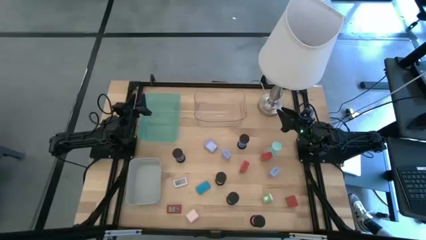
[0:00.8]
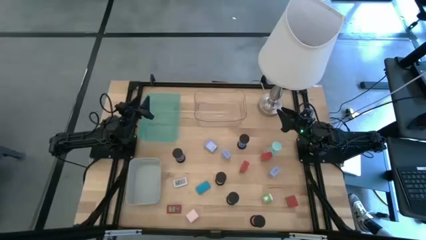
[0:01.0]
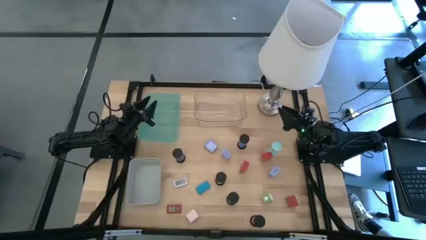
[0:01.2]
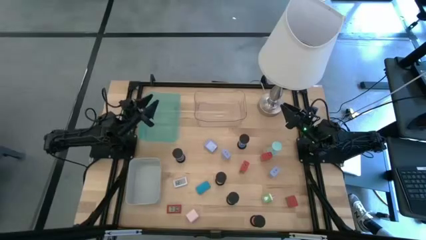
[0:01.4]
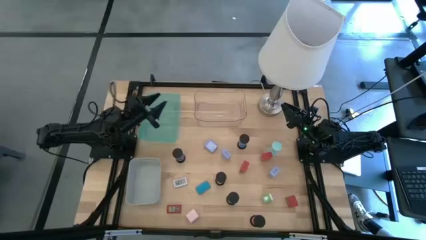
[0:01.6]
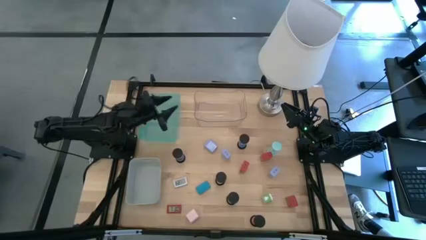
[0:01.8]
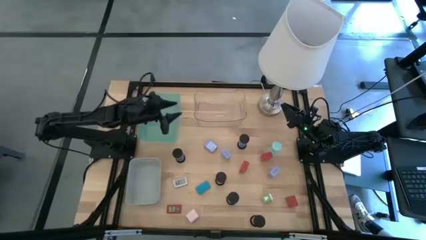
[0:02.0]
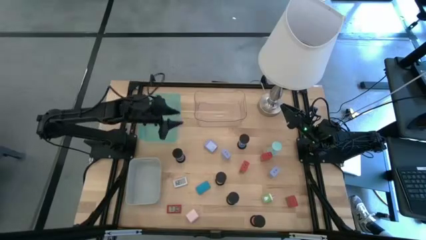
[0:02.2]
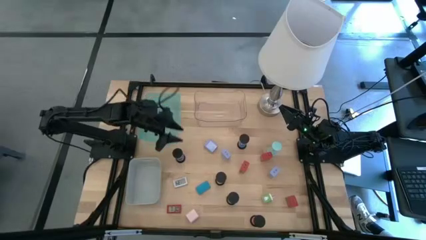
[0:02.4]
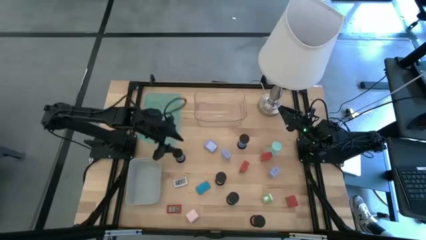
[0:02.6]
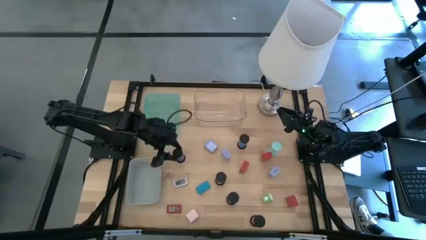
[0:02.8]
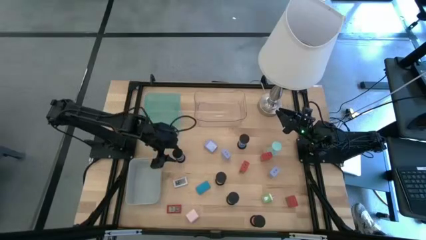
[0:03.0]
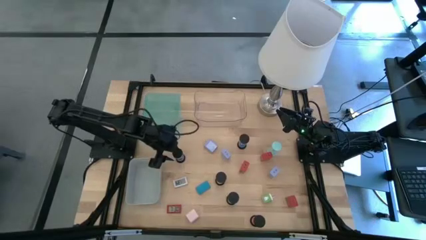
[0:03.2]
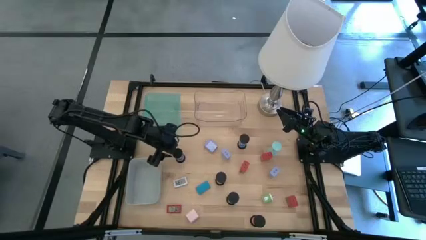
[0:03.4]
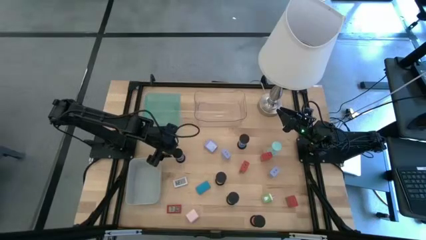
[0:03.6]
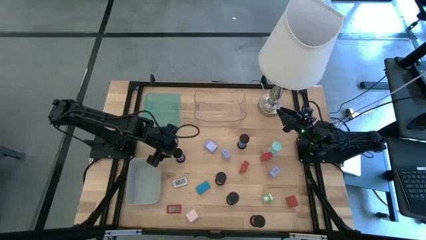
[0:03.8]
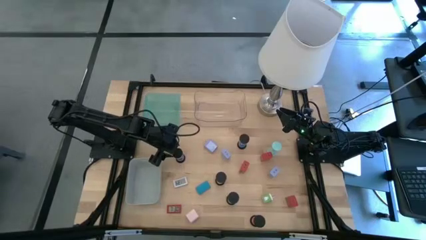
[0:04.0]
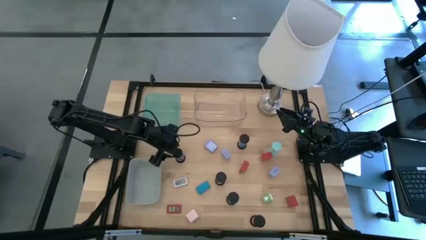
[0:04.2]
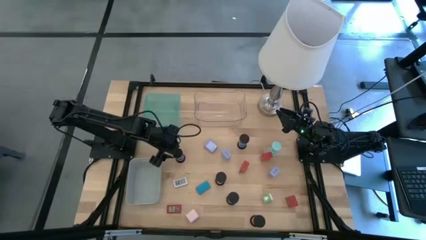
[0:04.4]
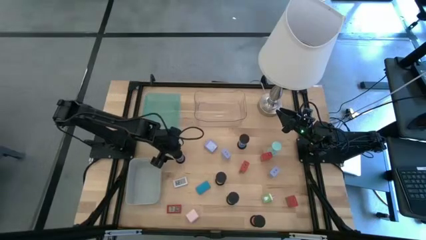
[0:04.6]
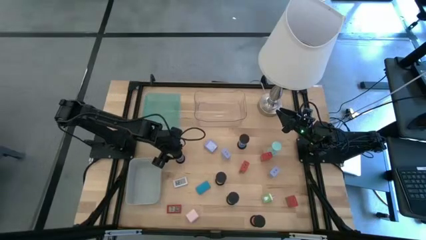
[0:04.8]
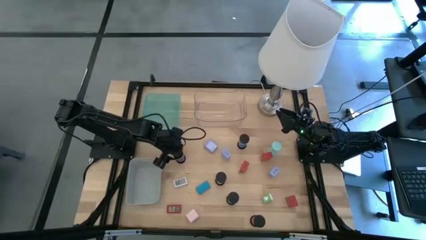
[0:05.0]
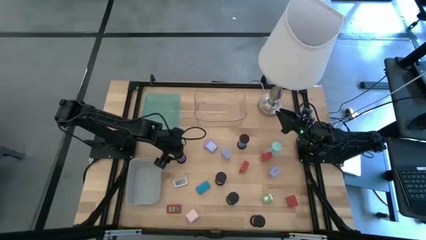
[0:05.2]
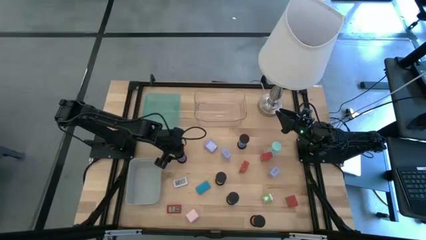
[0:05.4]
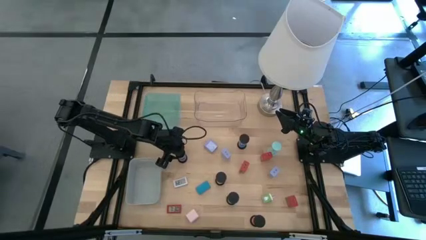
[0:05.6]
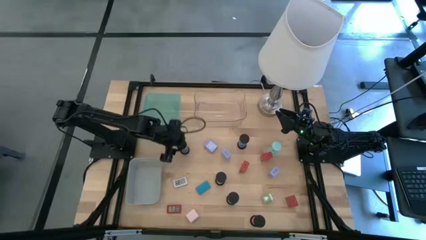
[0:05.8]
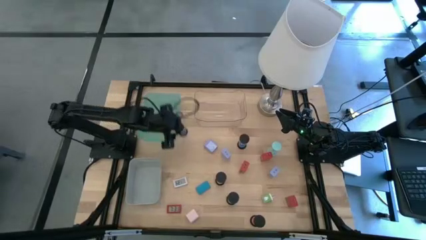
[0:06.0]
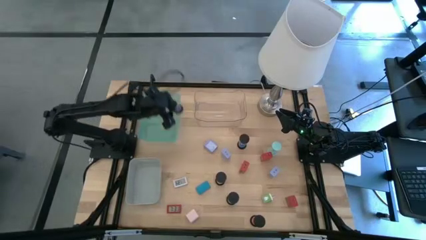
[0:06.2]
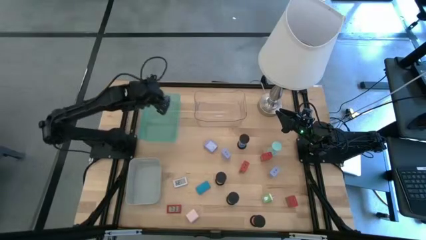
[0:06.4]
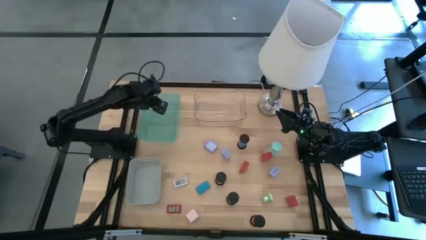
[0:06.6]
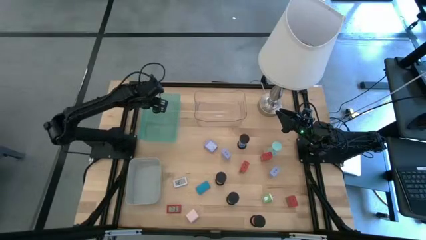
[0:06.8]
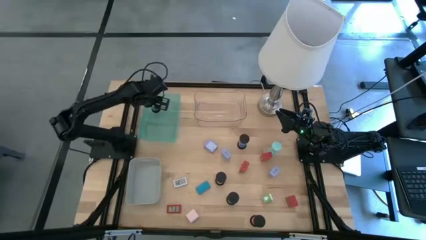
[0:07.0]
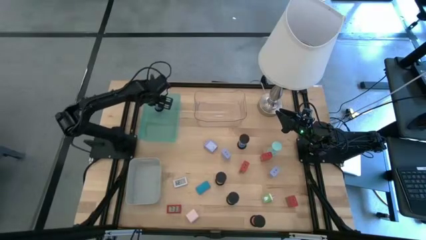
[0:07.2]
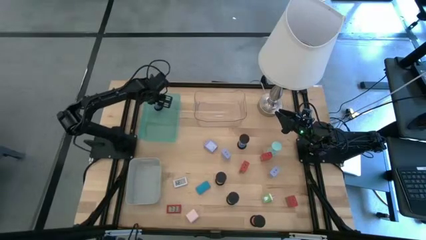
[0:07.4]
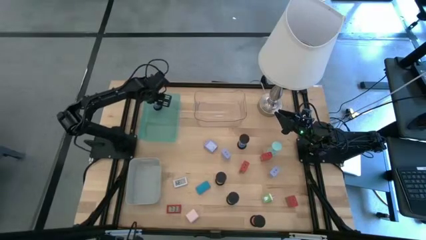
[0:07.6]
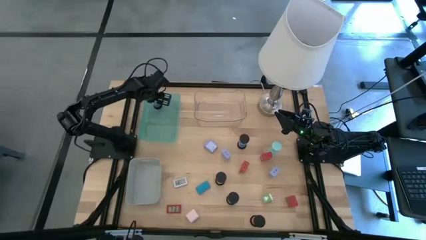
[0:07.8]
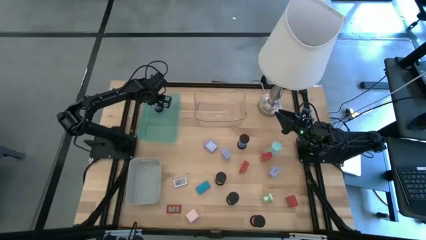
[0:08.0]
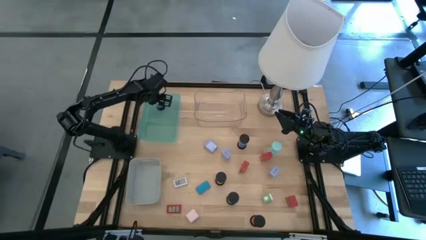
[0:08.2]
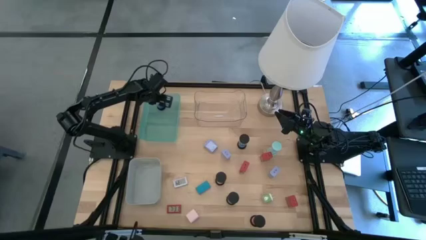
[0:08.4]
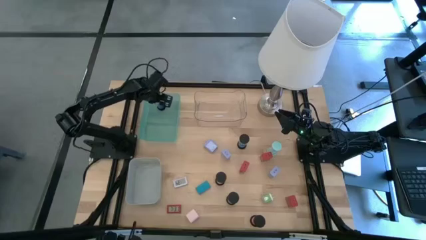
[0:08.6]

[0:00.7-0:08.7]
Task: Pick & Place Office items
Put the left blue hourglass into the green bin

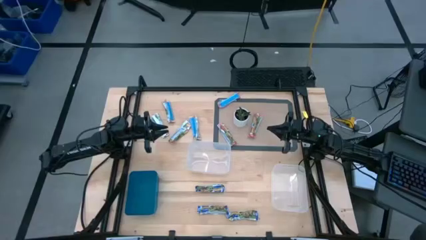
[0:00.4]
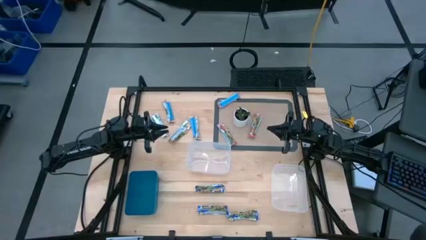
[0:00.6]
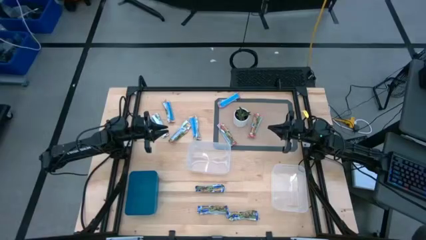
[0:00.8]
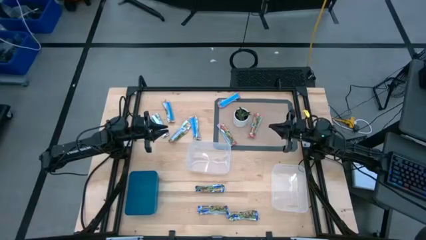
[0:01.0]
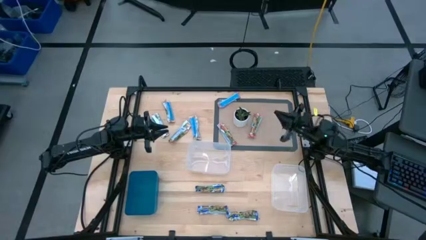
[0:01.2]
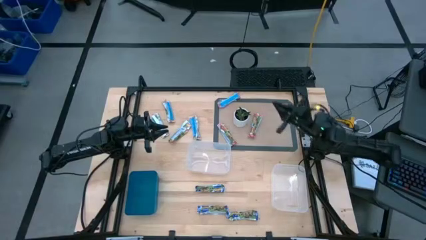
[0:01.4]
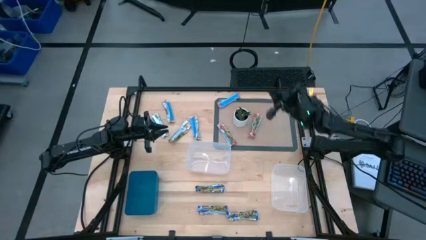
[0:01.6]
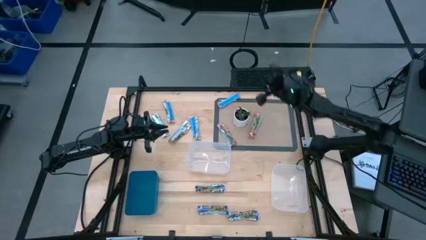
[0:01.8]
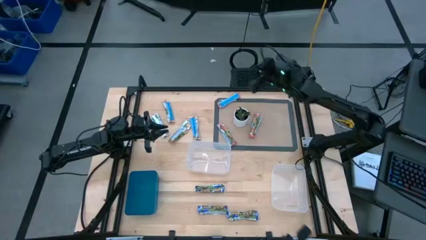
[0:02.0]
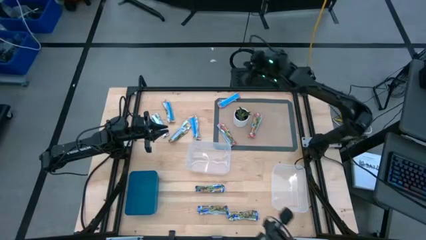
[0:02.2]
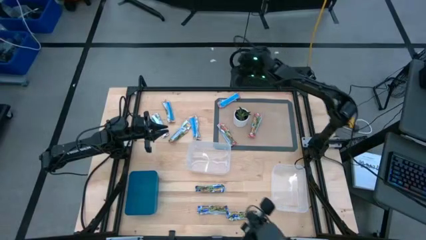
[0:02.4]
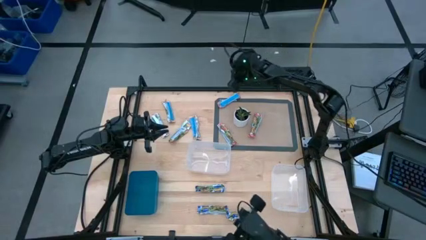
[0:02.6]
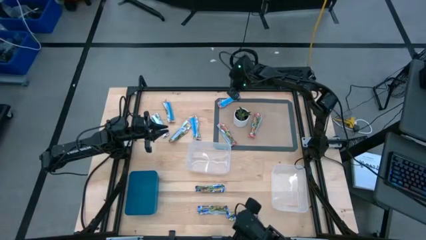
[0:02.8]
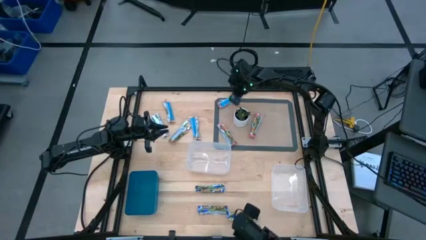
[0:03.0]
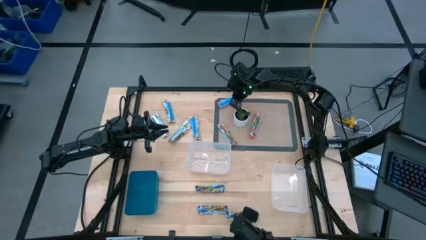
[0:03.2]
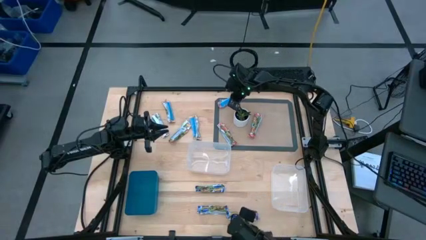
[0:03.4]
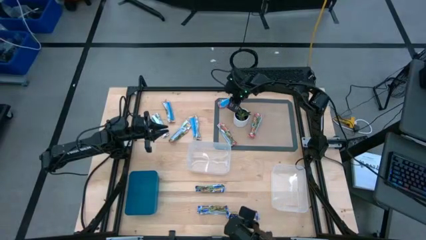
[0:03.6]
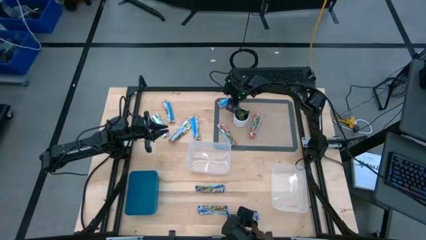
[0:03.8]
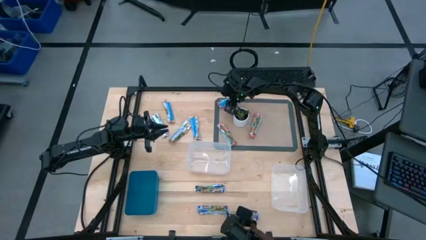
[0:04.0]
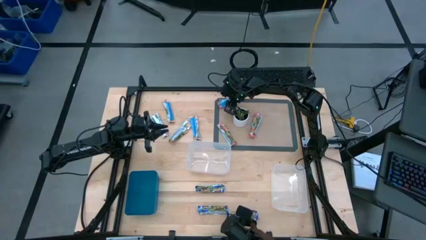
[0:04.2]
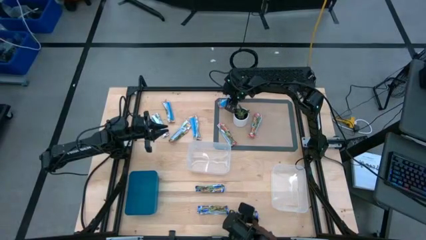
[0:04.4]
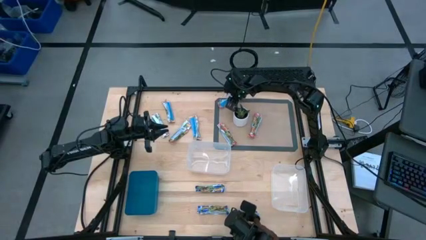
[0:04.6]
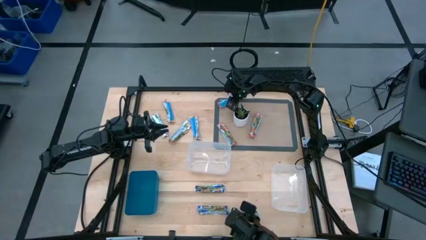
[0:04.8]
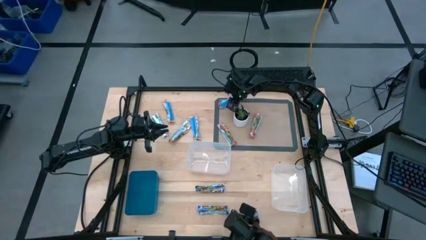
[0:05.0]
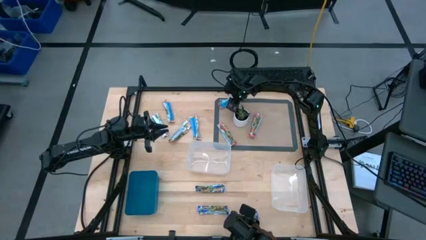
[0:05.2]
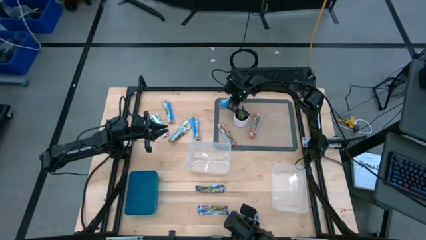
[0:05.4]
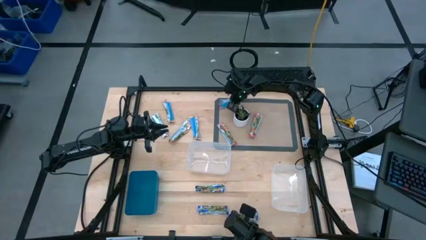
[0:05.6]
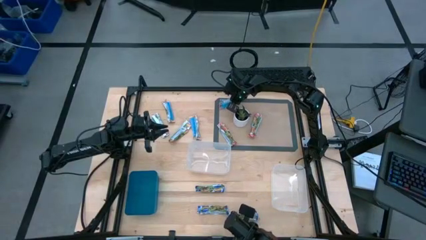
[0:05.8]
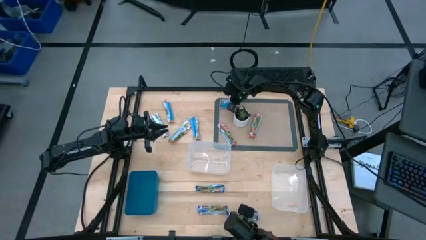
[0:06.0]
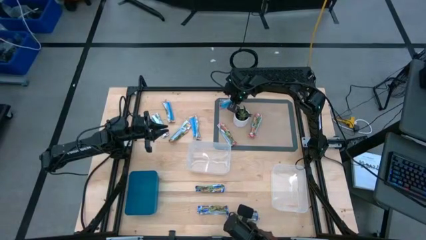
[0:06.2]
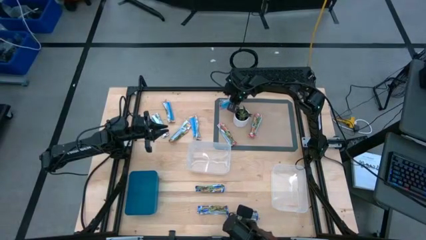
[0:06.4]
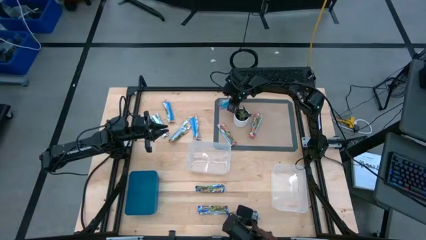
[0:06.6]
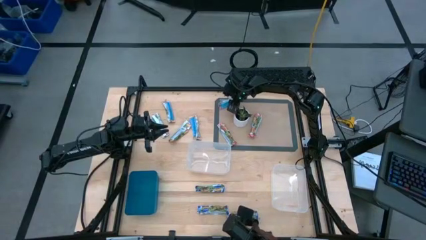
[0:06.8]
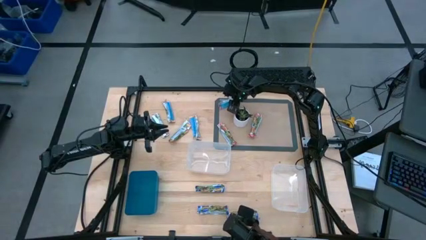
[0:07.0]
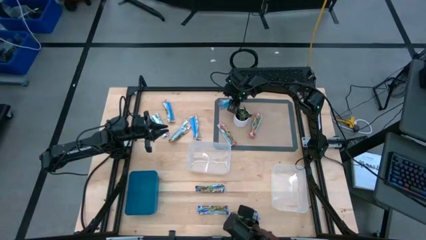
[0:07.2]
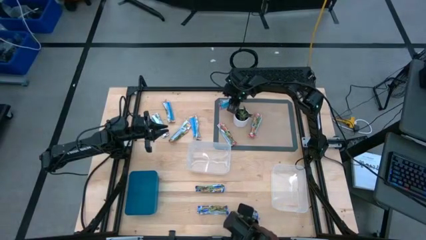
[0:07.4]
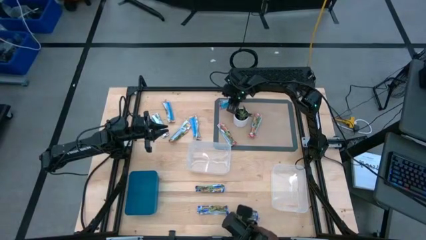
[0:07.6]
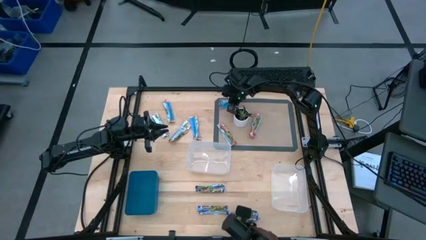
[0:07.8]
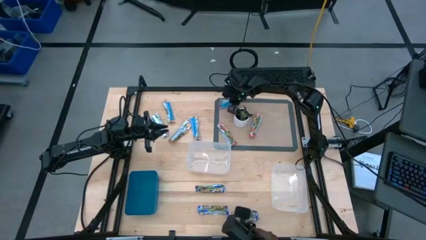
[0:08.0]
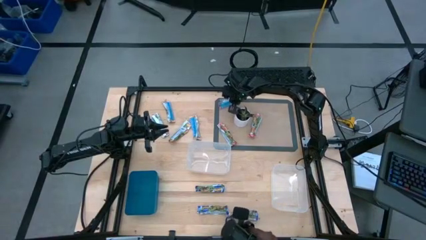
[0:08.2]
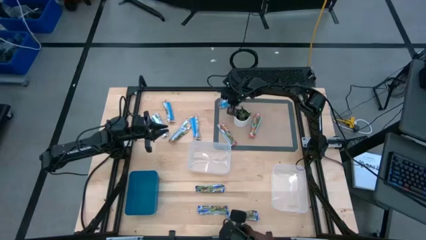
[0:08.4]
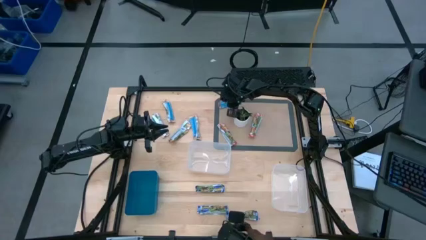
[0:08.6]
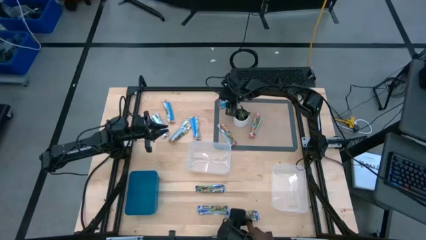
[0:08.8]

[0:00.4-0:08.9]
Task: Pick and place Granola Bars by type
Put the red granola bar into the right transparent bin
